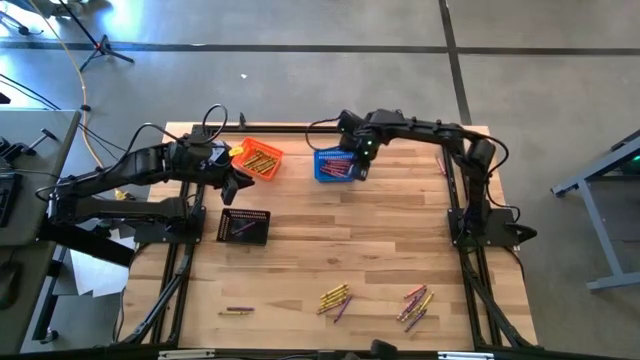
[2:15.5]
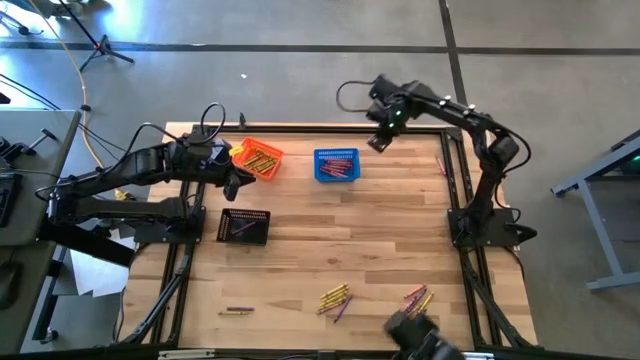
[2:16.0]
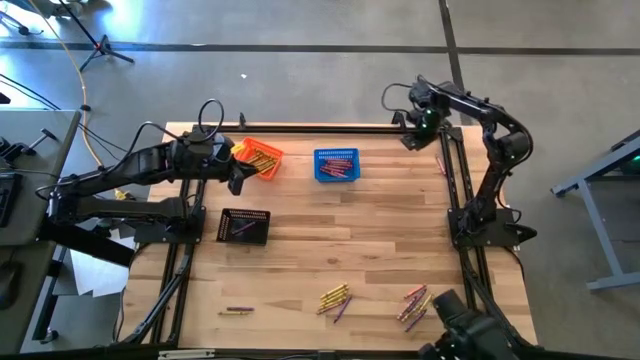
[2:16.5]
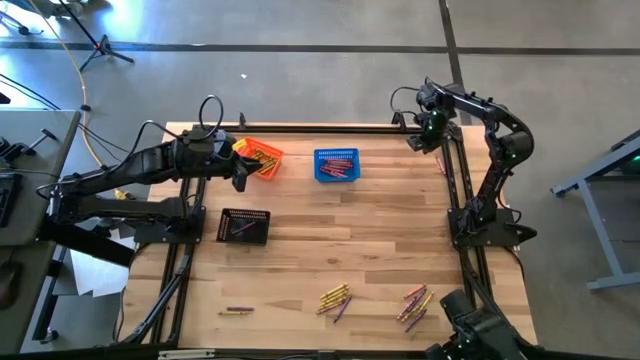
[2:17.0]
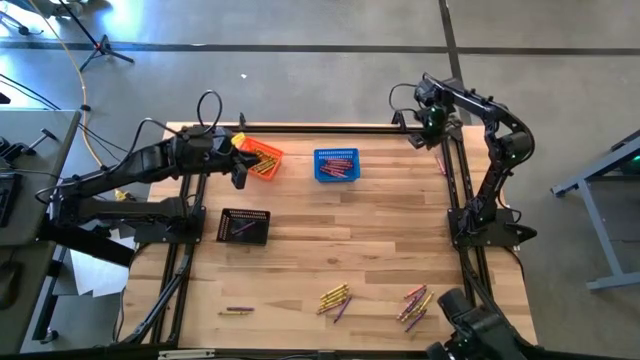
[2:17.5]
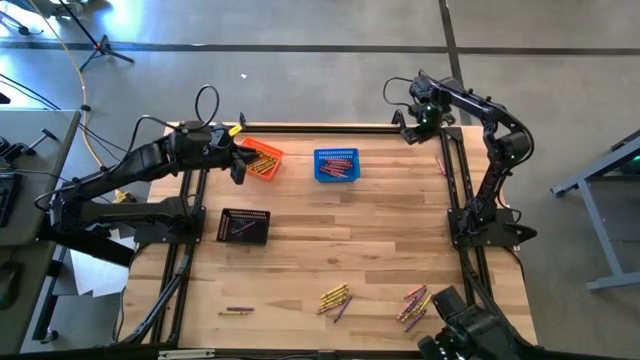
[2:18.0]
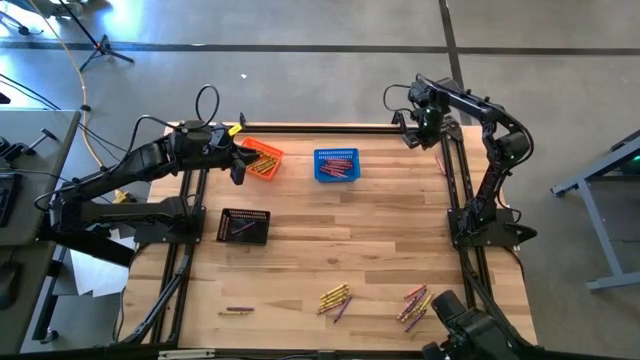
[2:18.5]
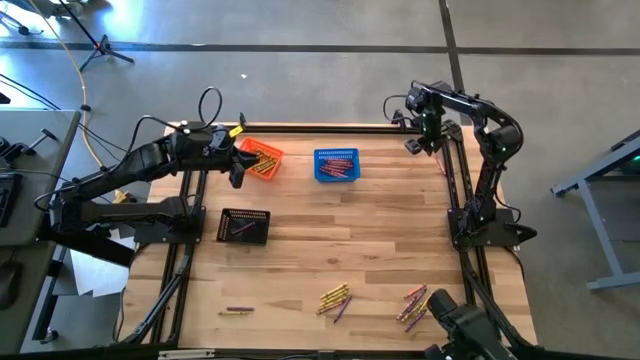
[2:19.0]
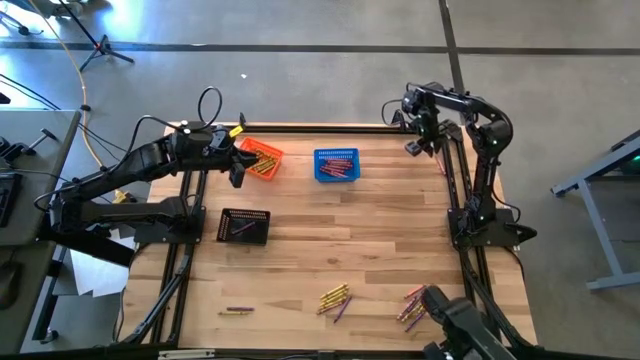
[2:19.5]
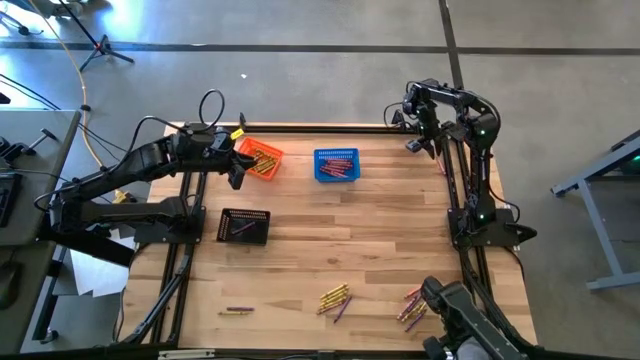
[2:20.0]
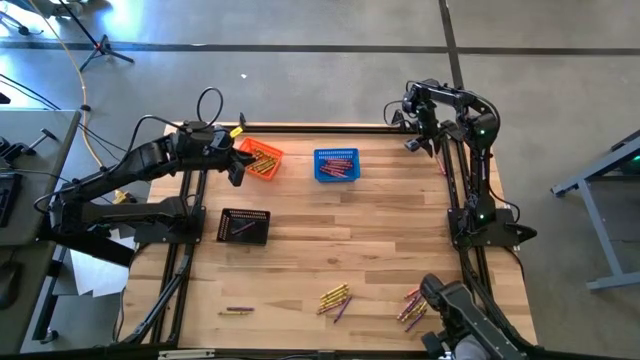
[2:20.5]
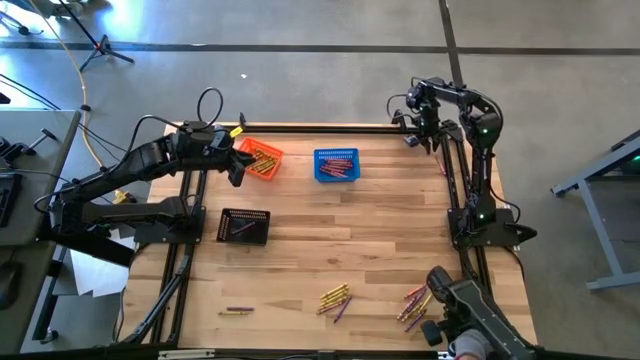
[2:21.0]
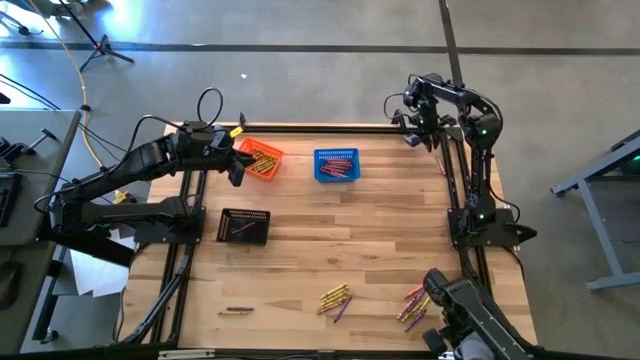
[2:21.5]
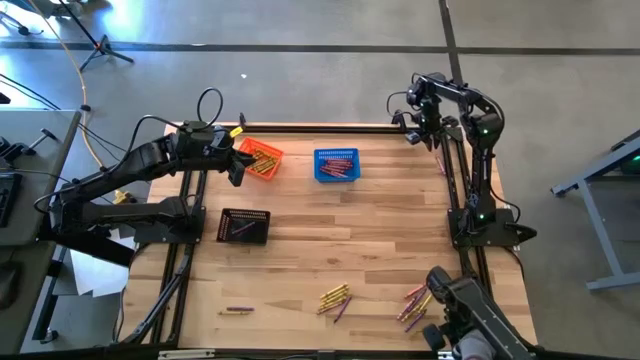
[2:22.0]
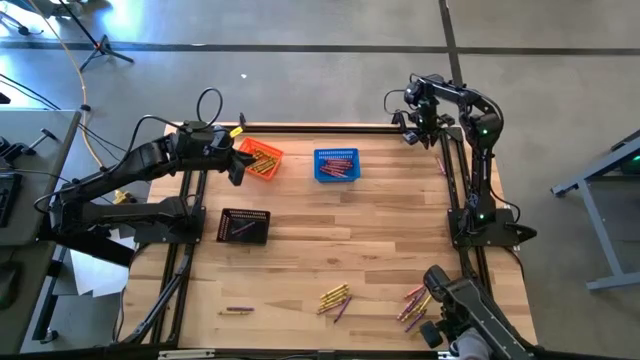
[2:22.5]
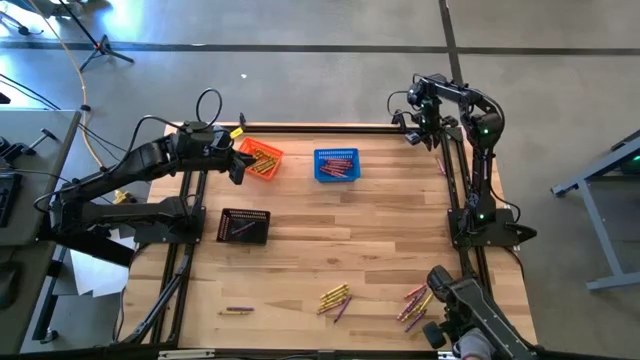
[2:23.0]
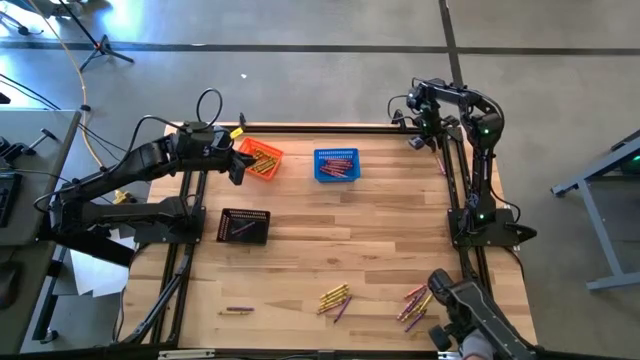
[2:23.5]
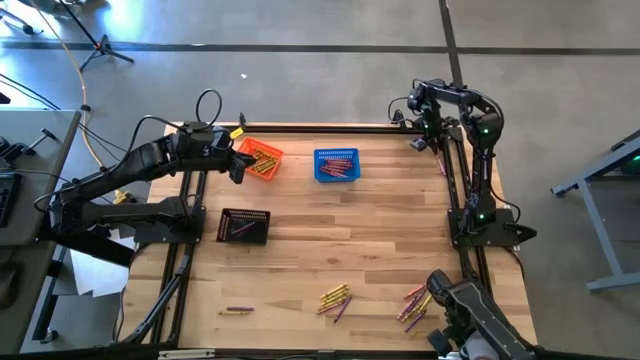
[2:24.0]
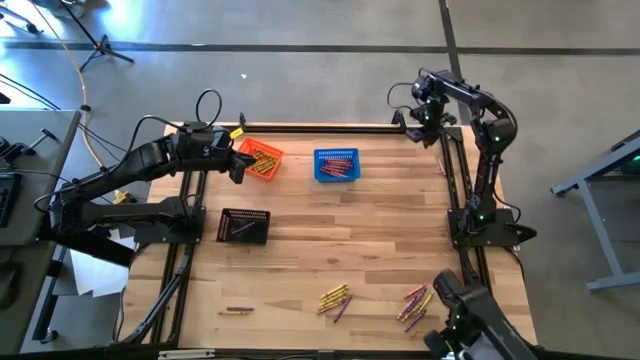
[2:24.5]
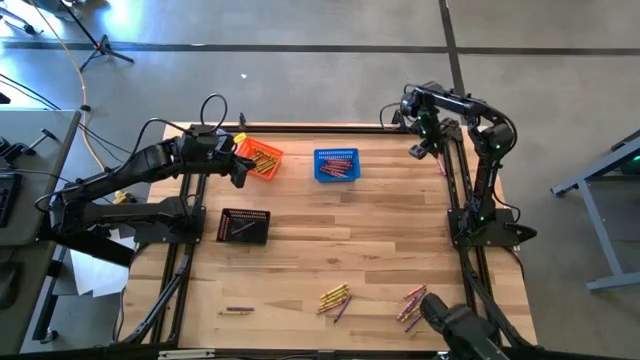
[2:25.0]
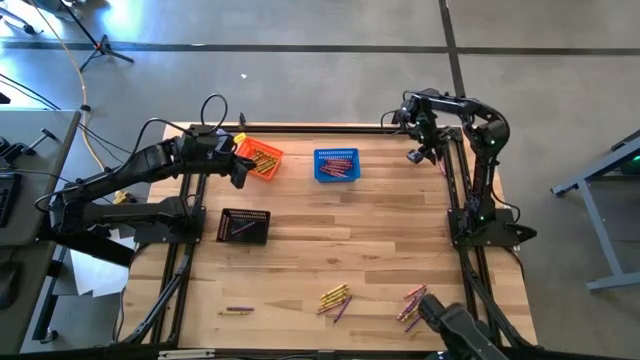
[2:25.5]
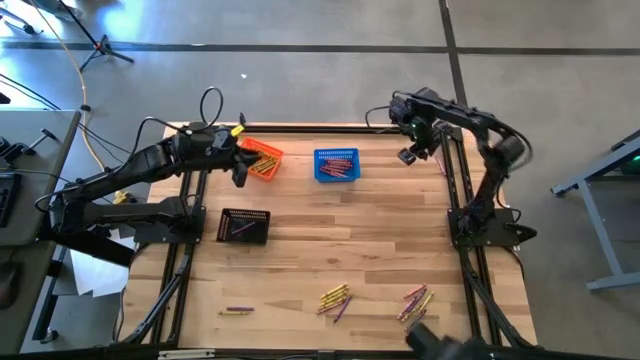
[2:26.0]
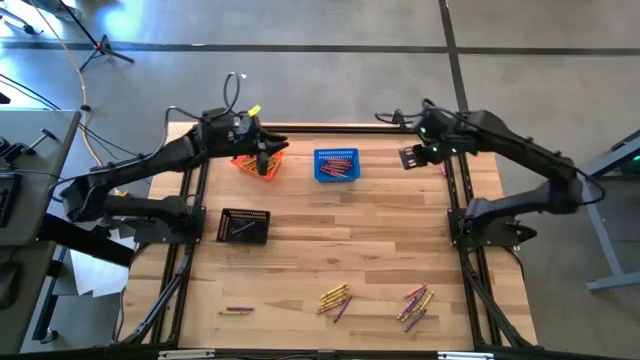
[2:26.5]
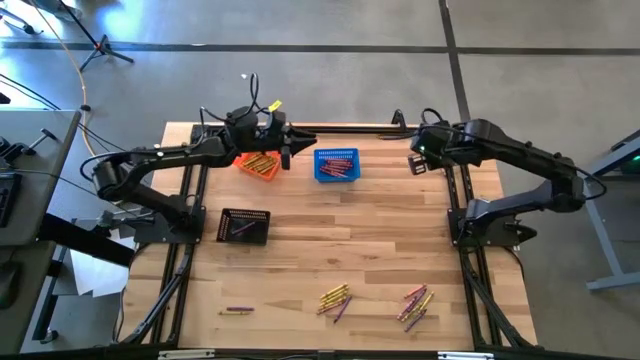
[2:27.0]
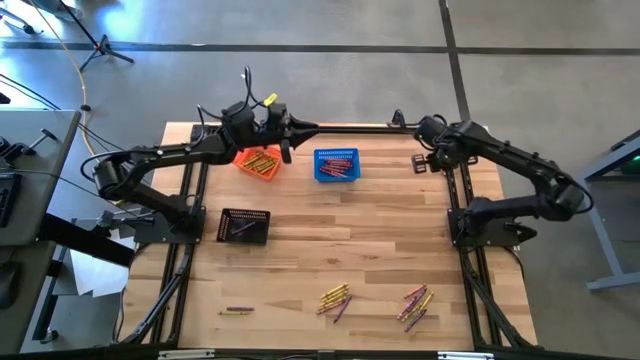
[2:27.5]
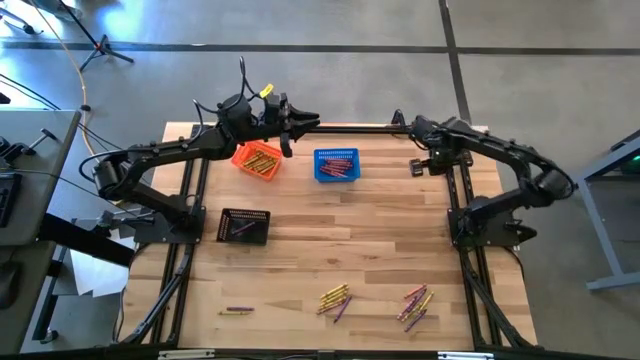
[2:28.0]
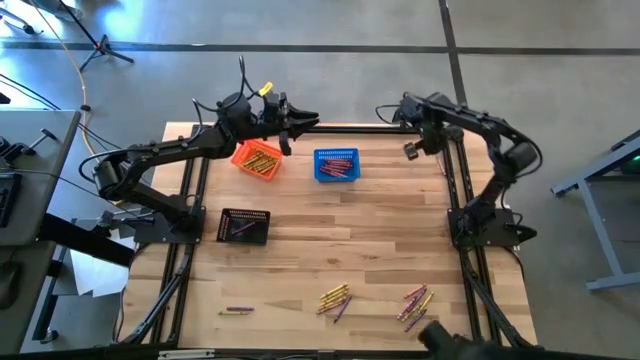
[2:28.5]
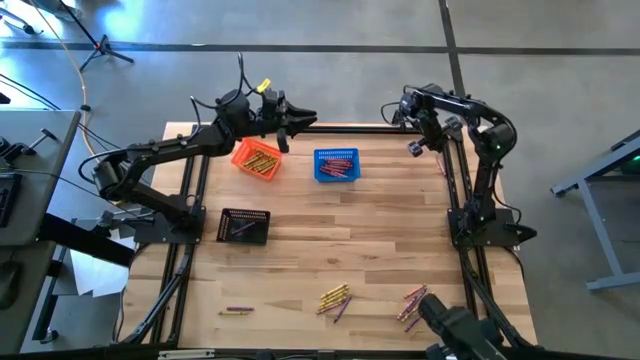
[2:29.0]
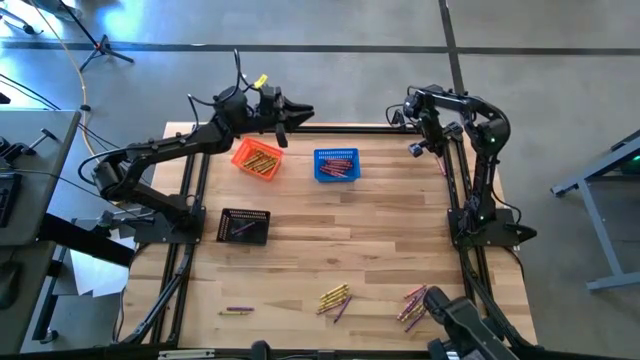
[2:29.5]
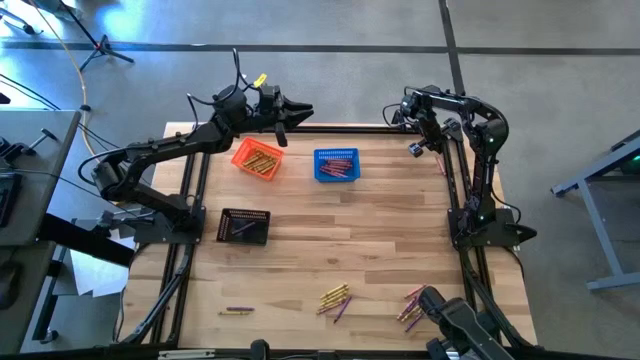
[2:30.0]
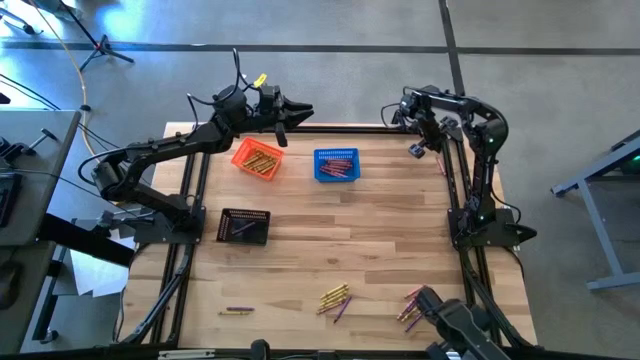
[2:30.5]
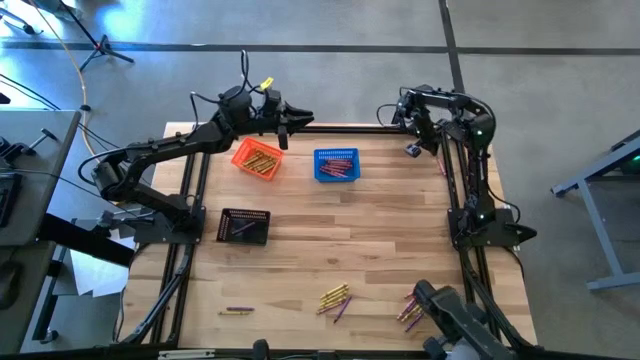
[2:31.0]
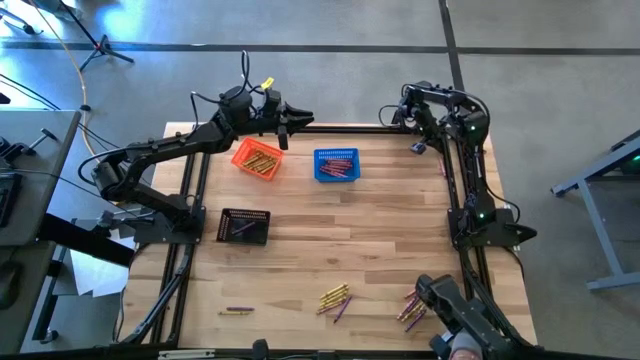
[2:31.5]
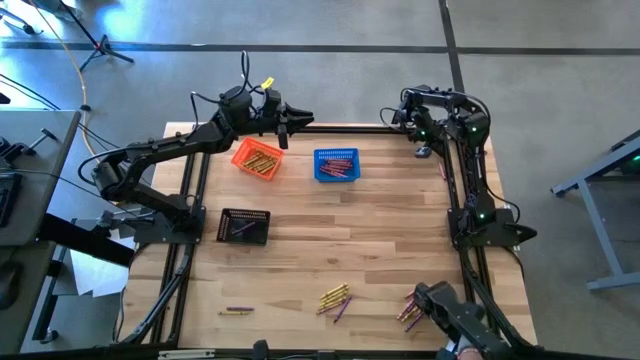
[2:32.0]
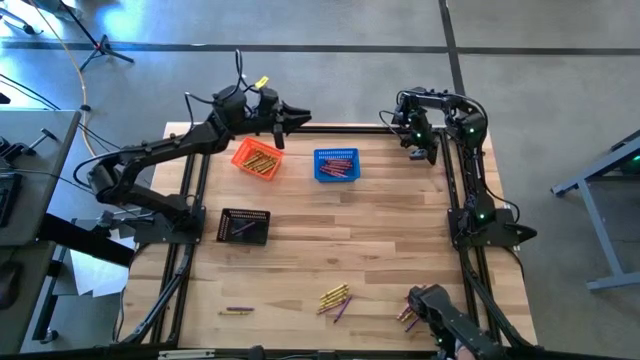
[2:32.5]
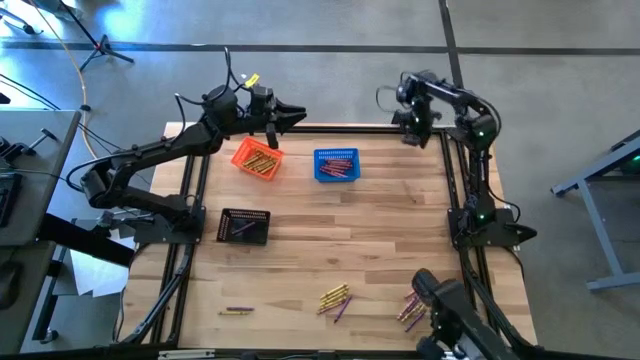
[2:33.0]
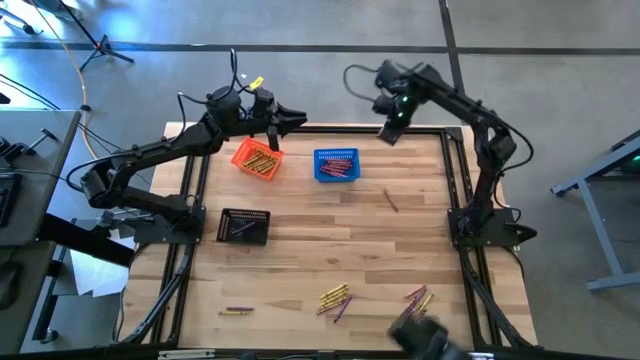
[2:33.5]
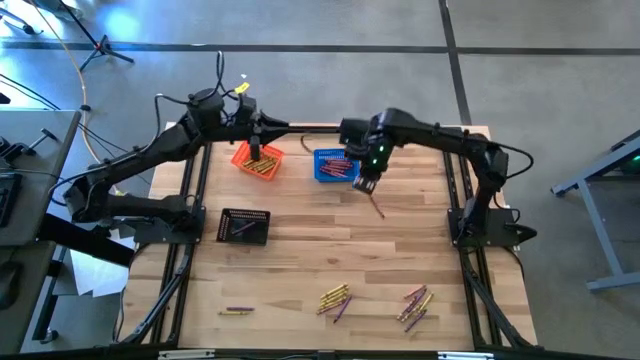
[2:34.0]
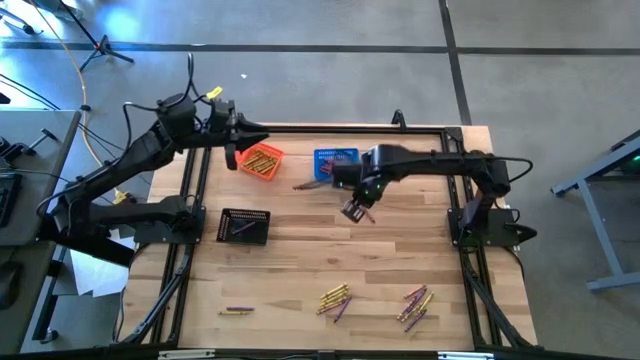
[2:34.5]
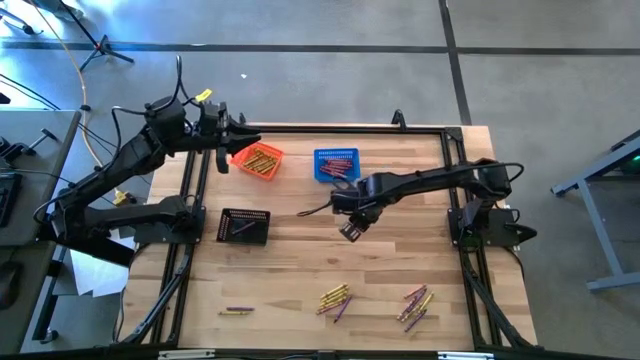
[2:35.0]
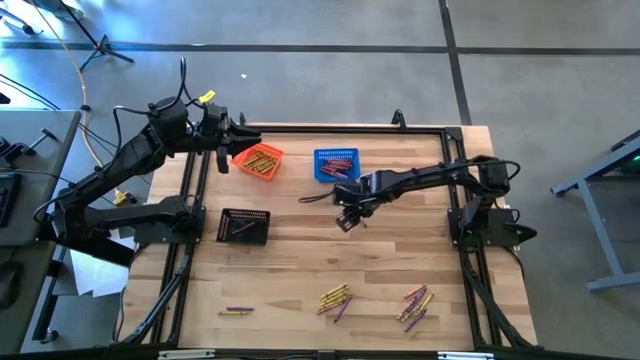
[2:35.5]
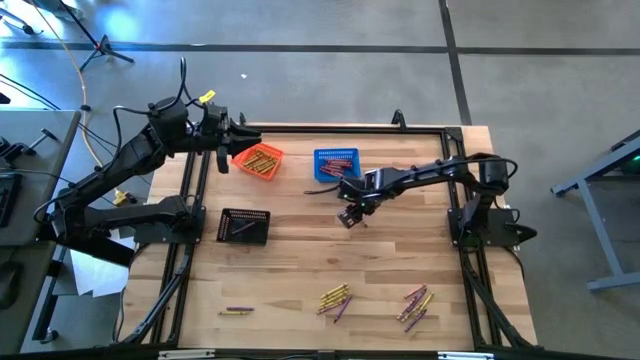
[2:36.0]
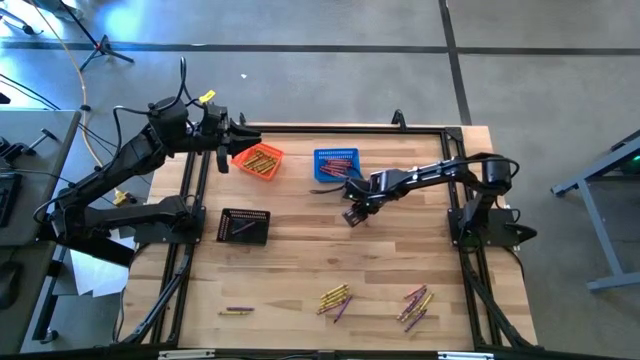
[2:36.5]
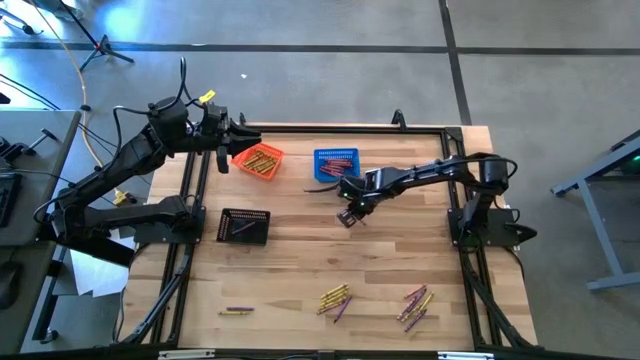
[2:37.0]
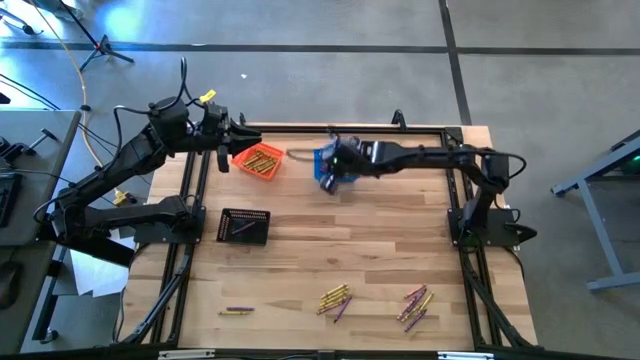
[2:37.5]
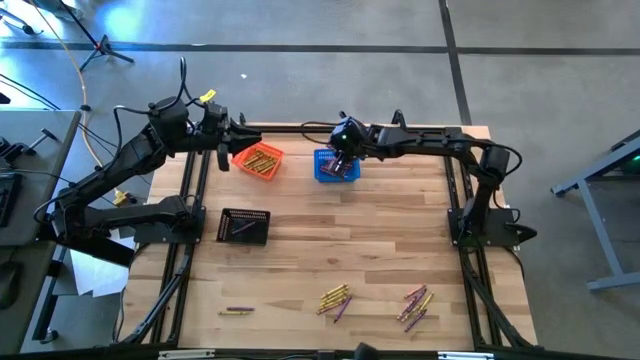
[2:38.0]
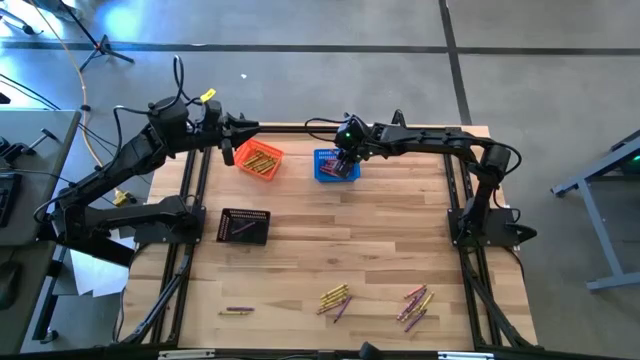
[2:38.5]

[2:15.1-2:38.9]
Task: Sort crayons
Put the red crayon into the blue bin
